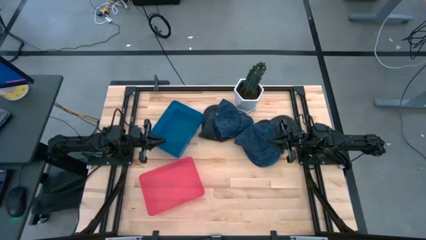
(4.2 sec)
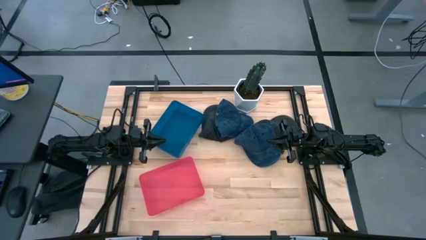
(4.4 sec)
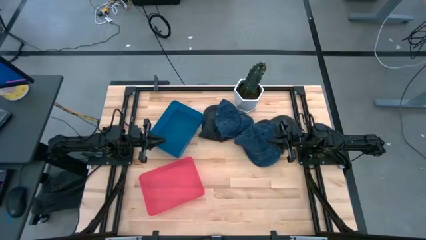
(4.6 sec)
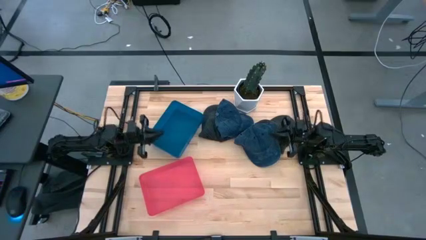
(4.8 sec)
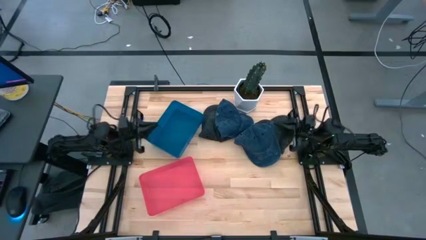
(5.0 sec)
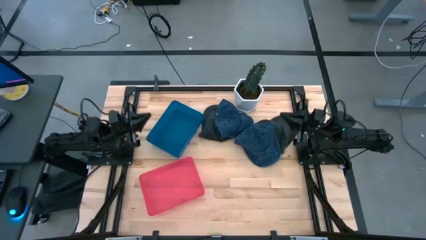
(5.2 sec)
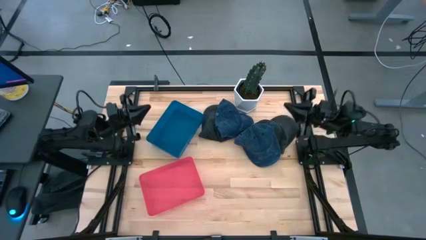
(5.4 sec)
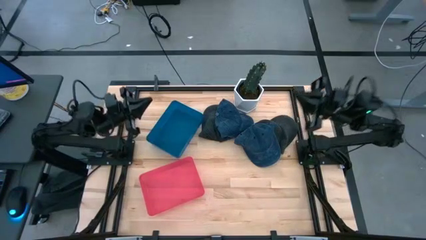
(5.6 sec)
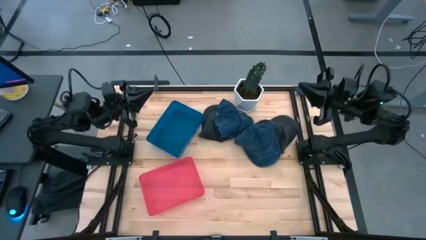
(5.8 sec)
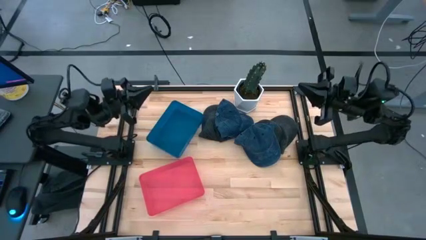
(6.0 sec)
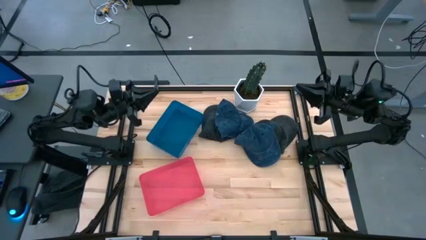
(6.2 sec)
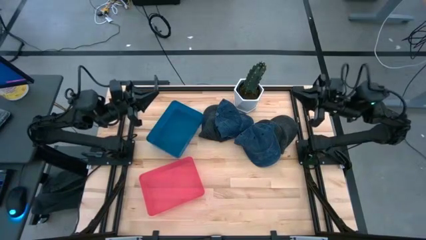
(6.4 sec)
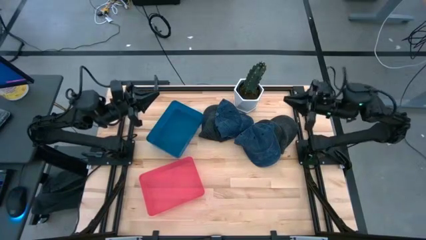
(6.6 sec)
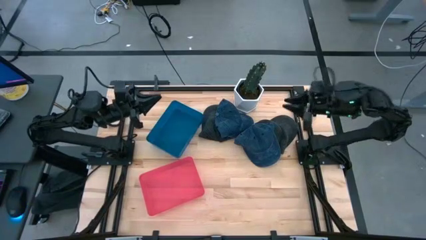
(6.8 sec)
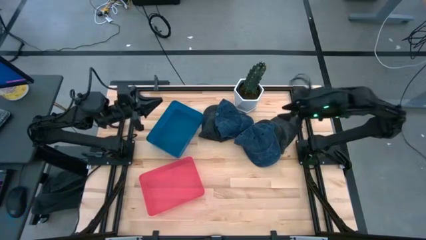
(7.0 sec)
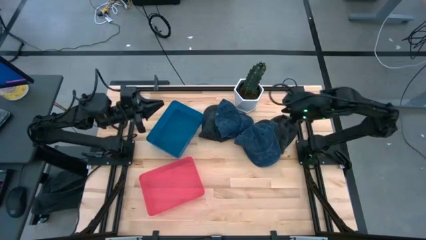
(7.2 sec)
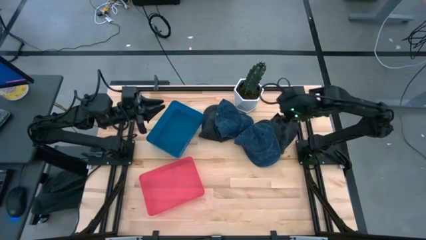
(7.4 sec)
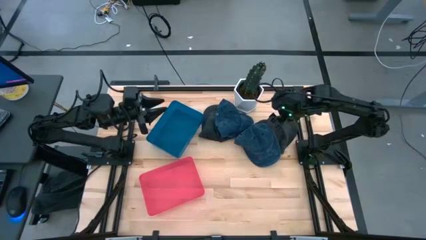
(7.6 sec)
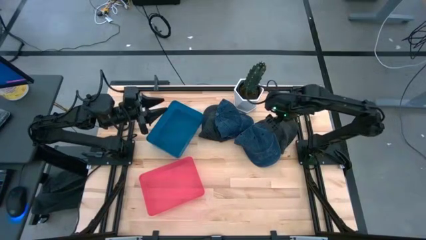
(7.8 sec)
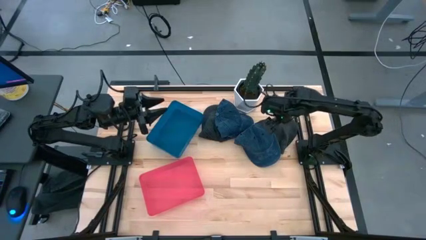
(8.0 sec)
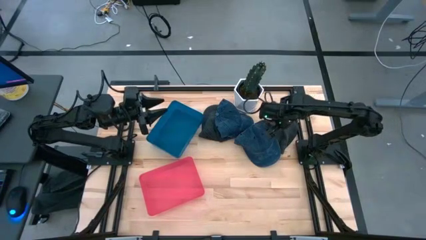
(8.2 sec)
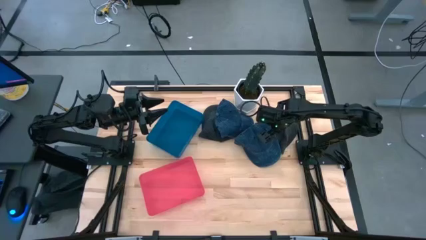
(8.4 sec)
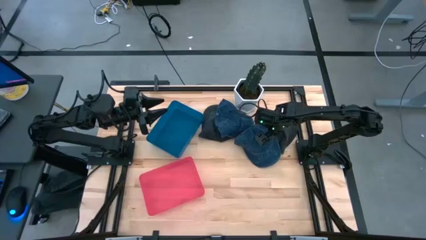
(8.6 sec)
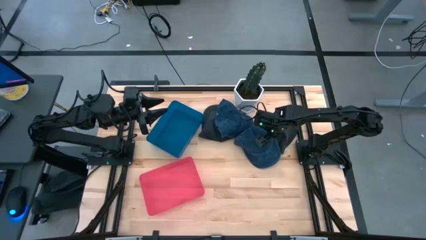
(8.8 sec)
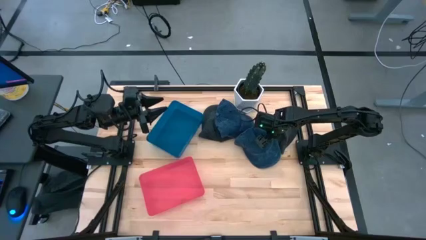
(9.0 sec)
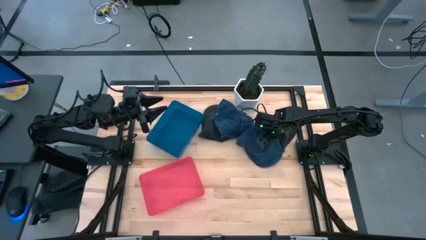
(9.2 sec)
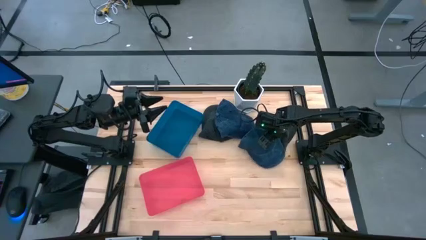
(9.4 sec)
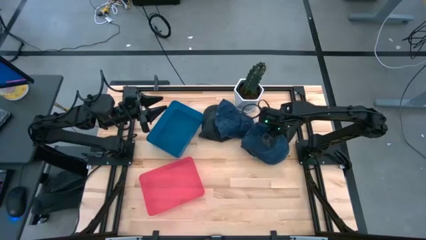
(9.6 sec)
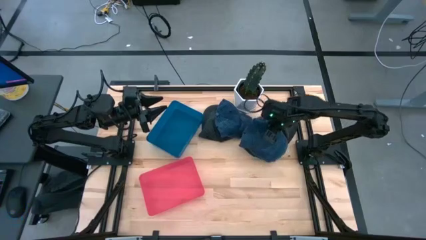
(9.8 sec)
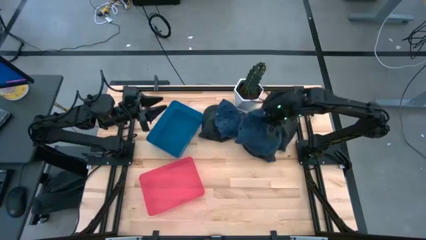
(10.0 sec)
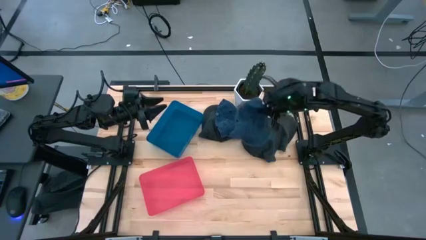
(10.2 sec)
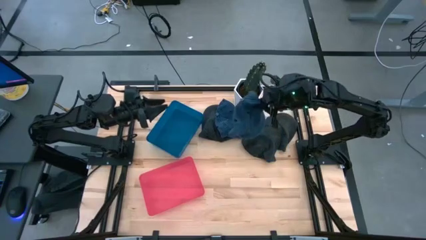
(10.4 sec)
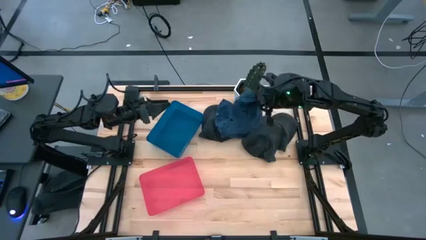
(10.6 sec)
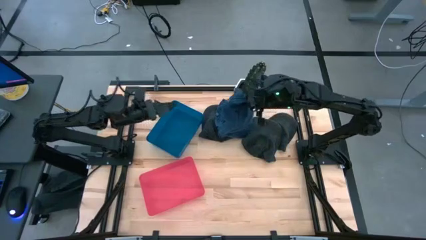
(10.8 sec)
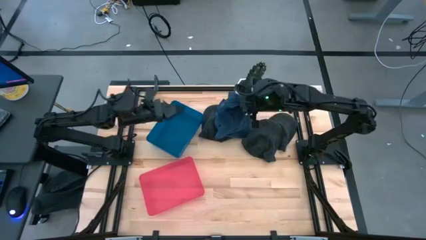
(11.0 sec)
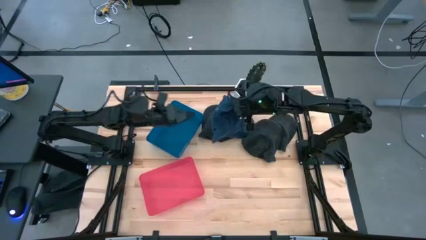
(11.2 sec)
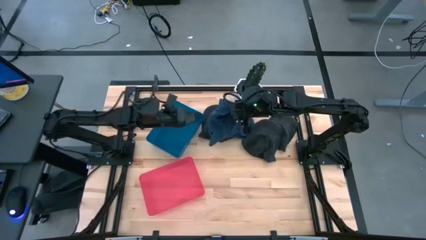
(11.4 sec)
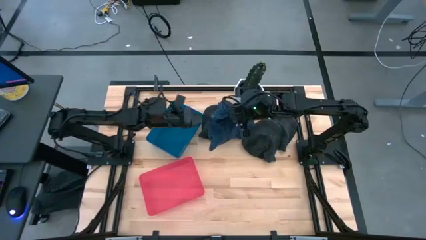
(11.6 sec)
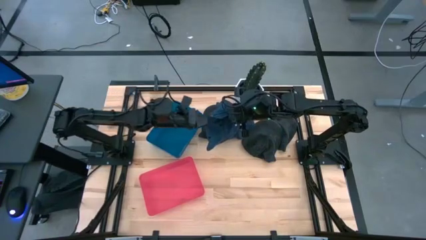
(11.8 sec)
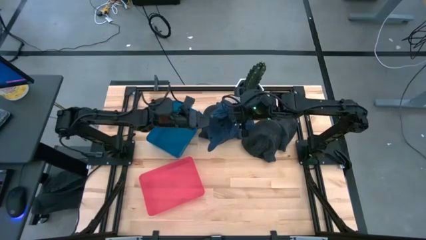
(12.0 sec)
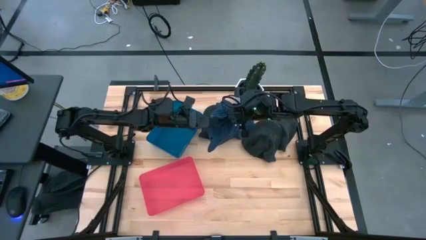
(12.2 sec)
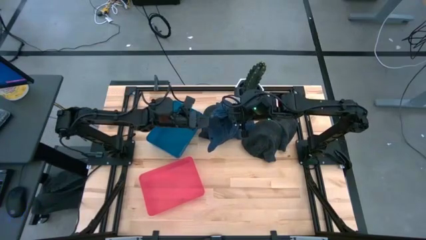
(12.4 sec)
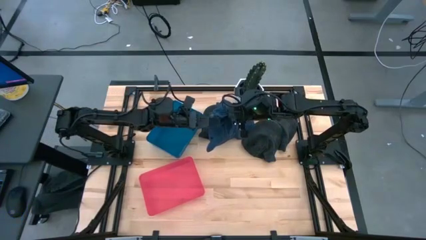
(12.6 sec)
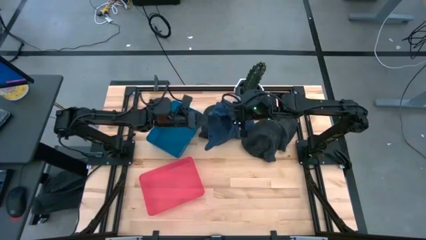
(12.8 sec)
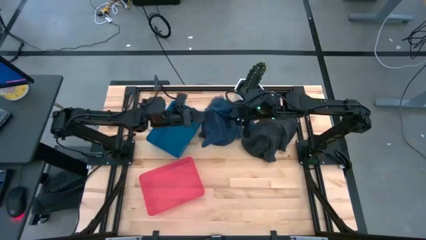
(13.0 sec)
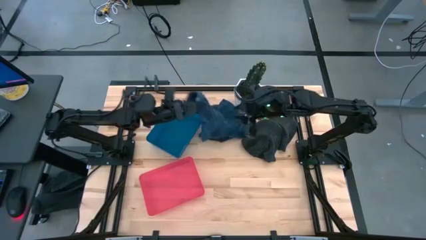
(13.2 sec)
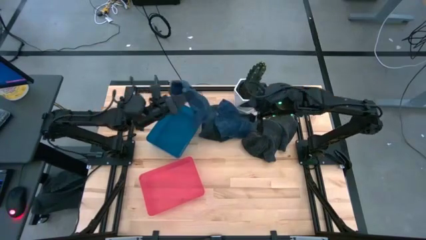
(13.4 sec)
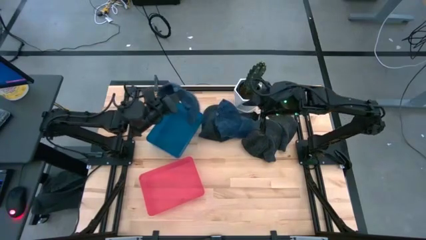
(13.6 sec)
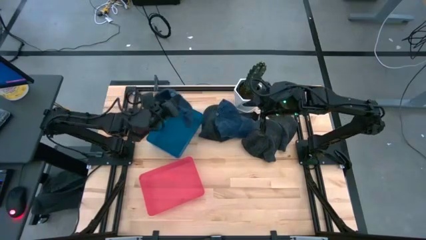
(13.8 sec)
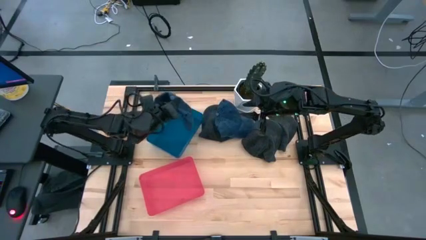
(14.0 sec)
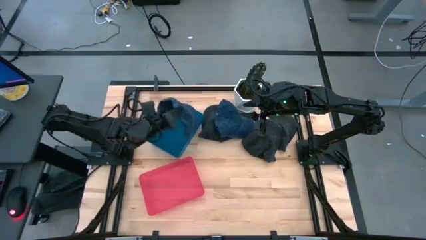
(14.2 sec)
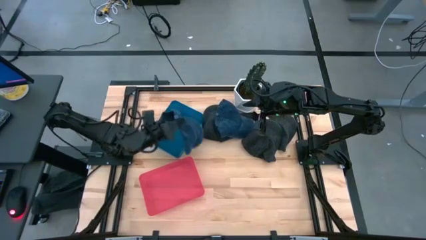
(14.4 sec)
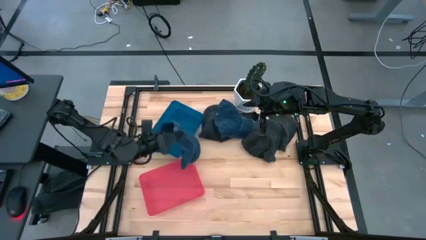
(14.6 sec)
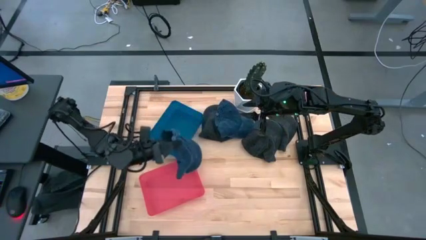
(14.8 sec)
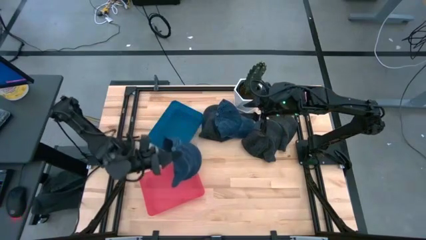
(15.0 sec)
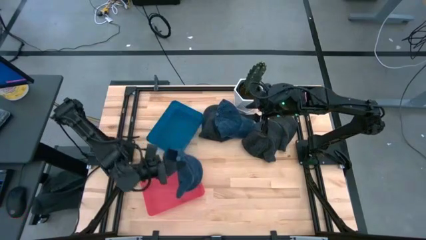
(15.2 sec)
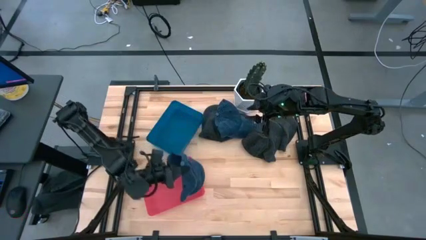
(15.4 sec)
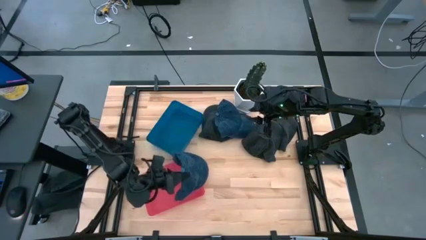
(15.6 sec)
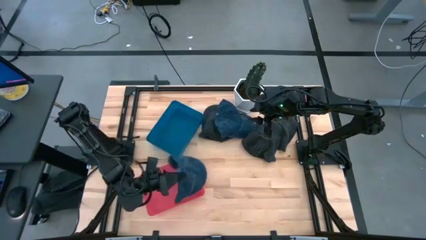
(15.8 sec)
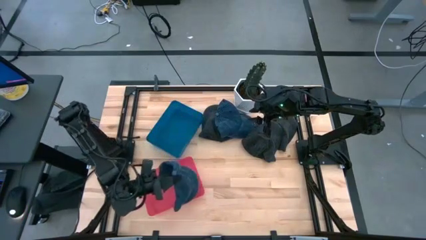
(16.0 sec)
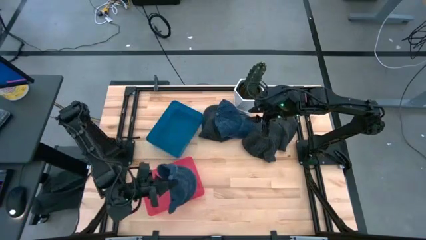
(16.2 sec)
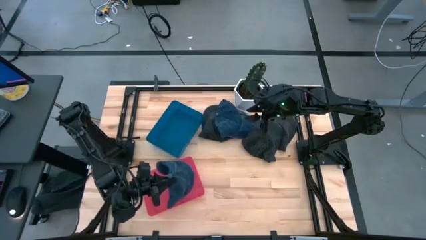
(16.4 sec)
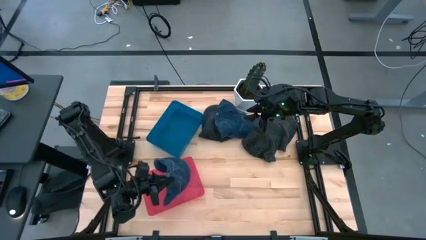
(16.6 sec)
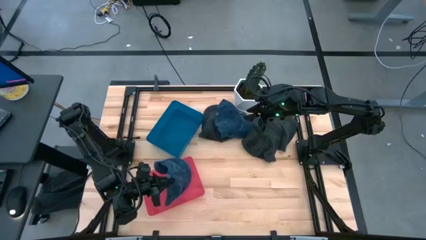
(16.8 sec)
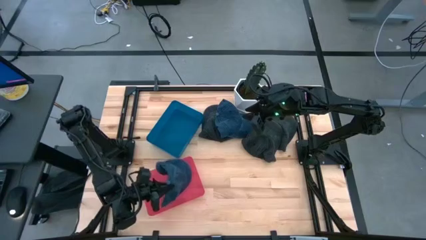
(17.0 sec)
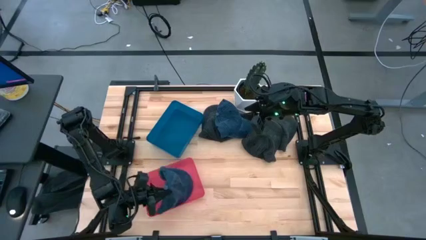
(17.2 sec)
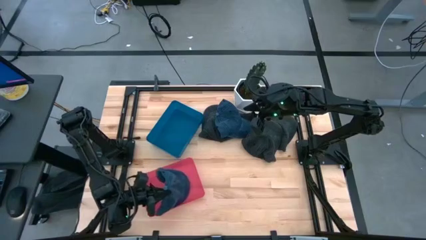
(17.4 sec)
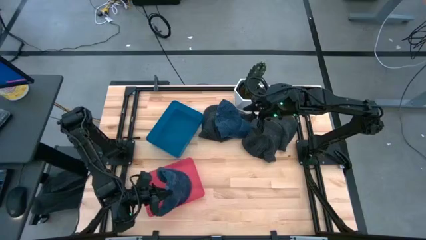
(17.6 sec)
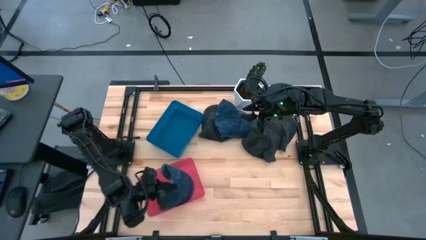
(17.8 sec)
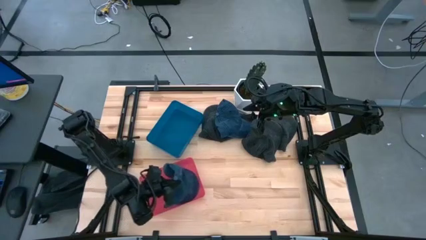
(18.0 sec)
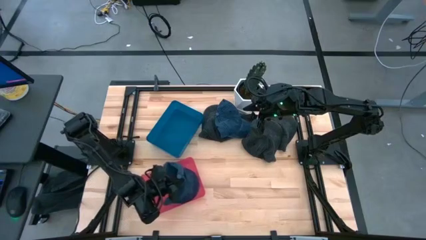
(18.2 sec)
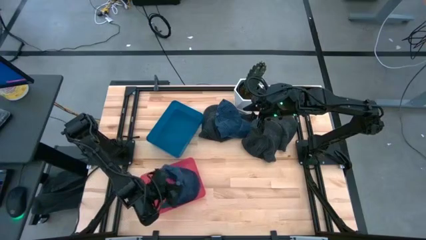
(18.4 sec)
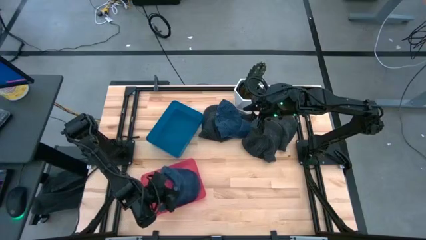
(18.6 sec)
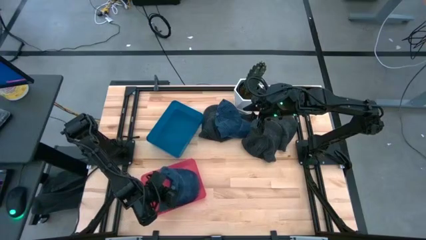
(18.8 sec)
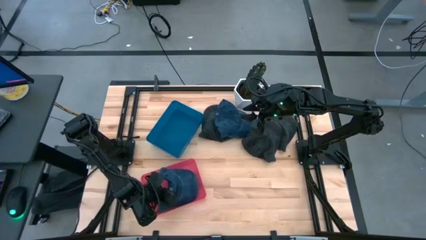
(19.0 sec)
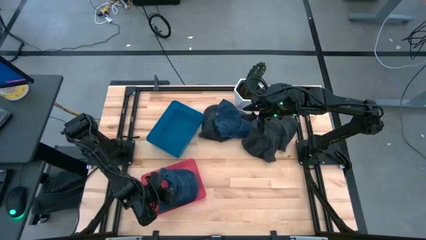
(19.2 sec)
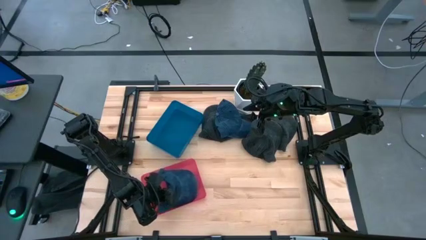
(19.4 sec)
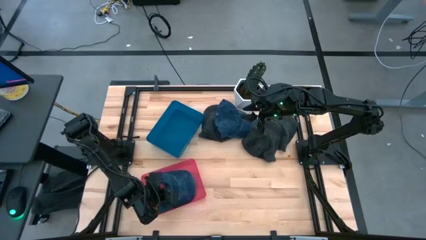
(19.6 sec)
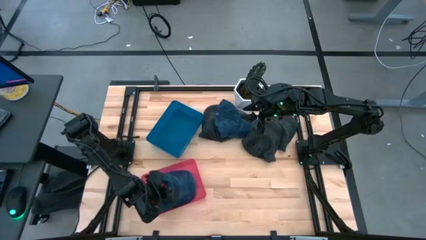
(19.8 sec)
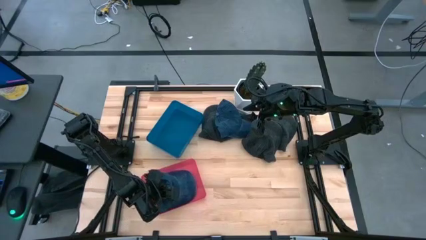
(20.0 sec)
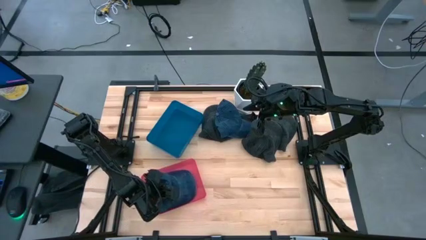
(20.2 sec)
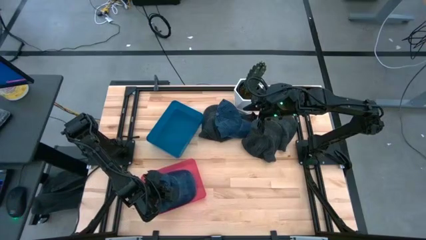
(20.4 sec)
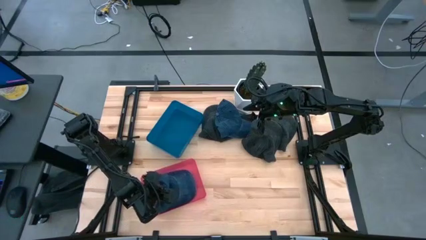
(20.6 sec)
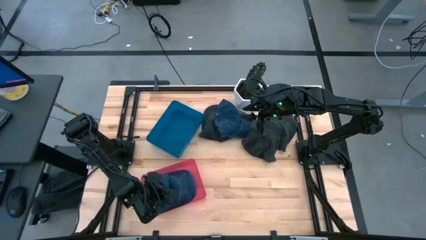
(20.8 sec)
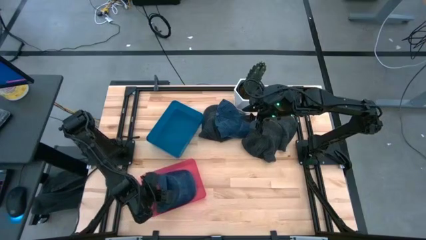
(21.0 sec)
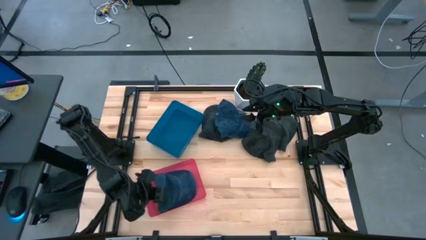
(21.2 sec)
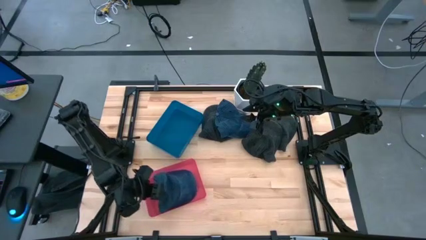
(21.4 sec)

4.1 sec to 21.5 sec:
Task: Pick & Place hat
Put the right blue cap into the red bin
